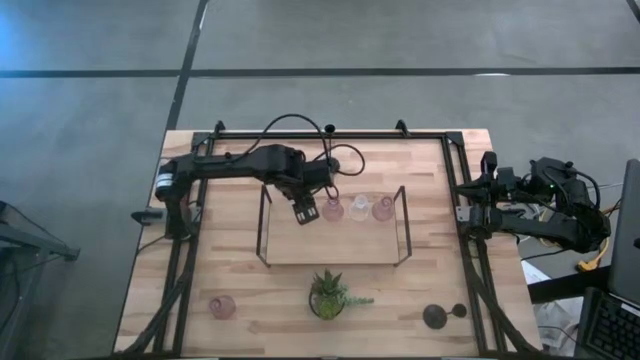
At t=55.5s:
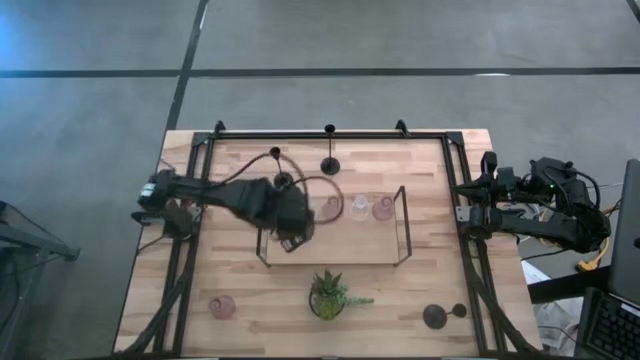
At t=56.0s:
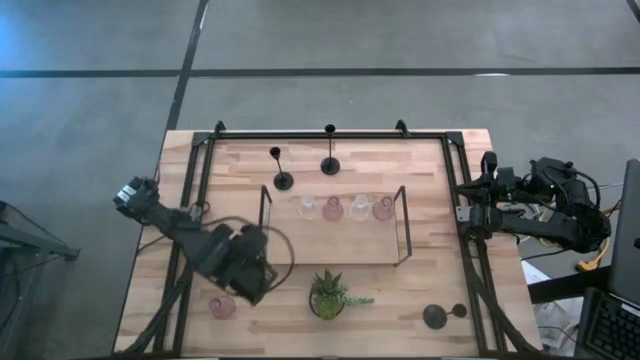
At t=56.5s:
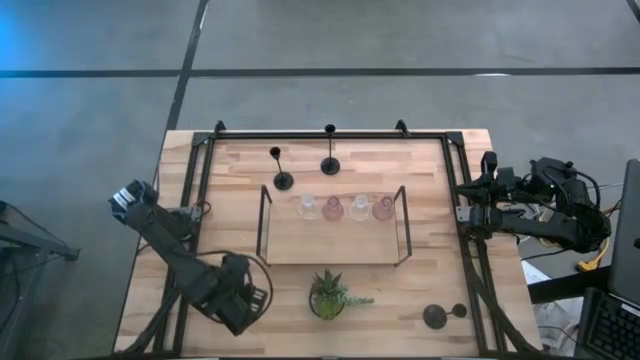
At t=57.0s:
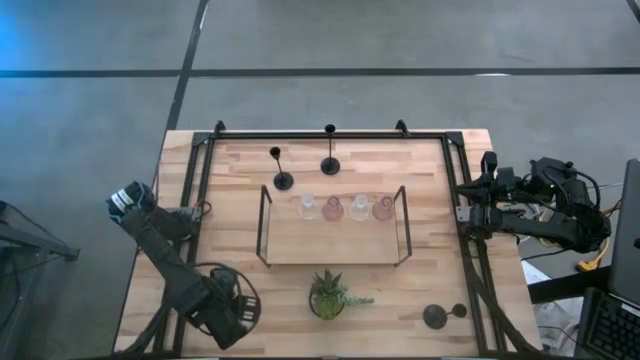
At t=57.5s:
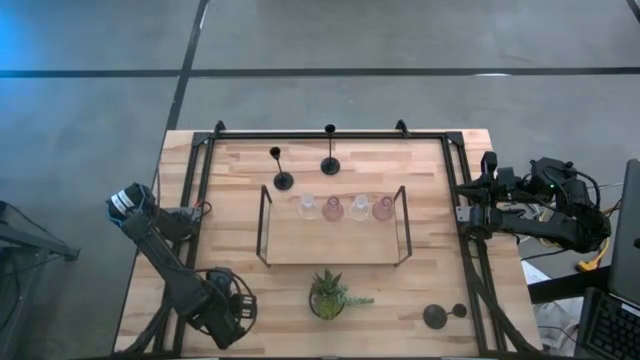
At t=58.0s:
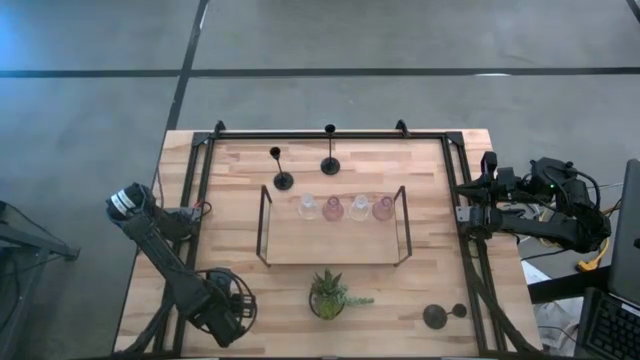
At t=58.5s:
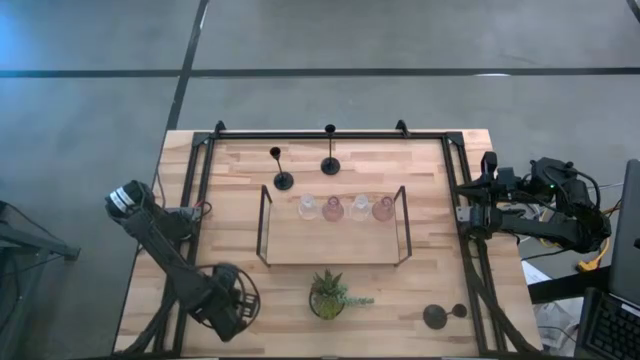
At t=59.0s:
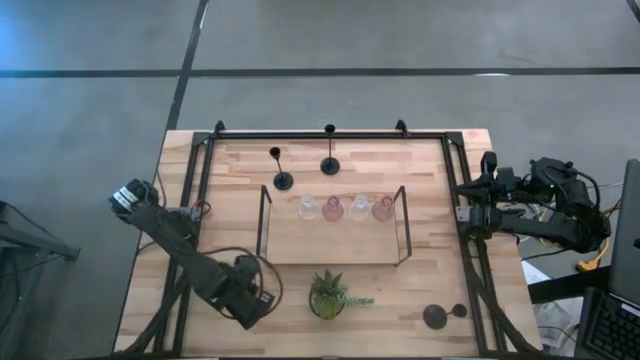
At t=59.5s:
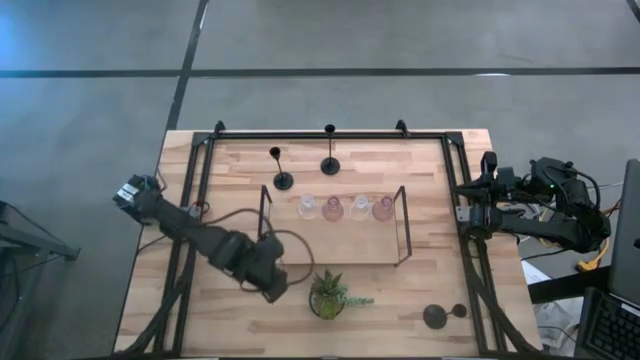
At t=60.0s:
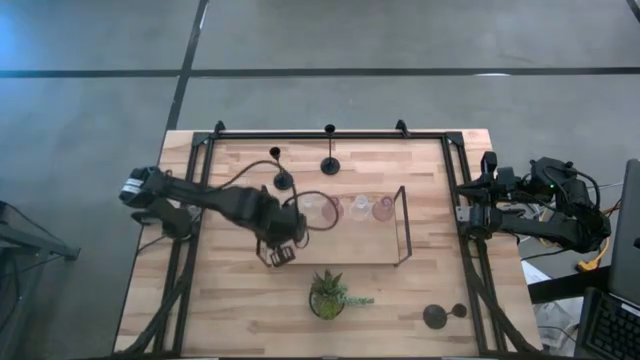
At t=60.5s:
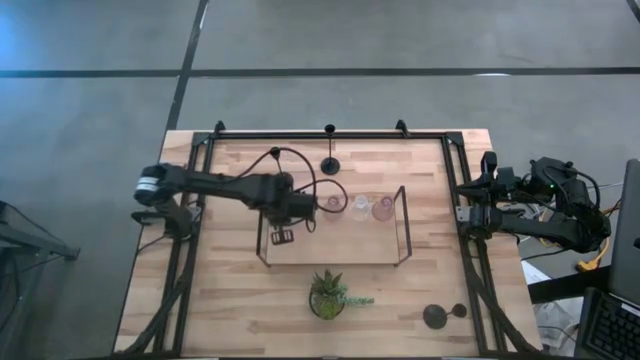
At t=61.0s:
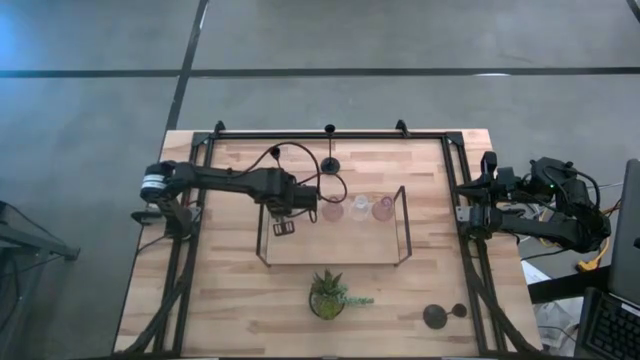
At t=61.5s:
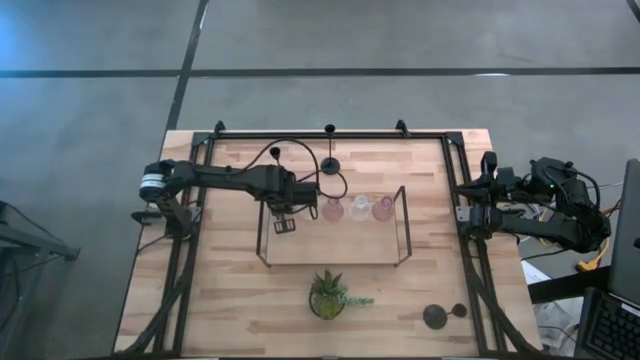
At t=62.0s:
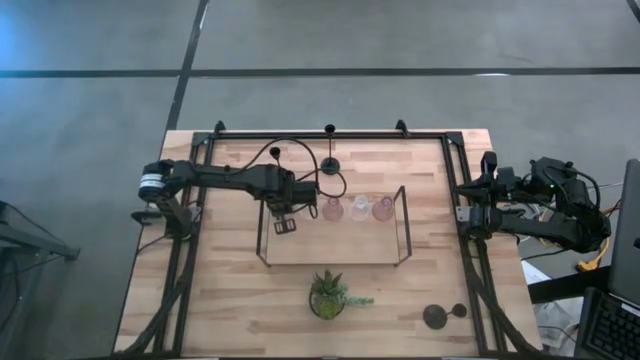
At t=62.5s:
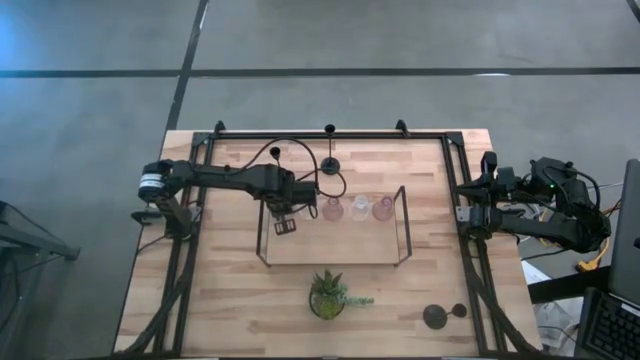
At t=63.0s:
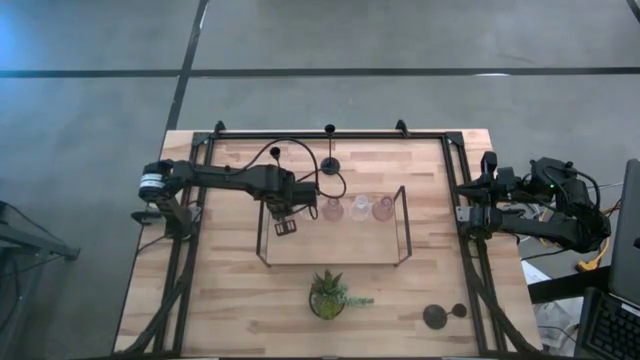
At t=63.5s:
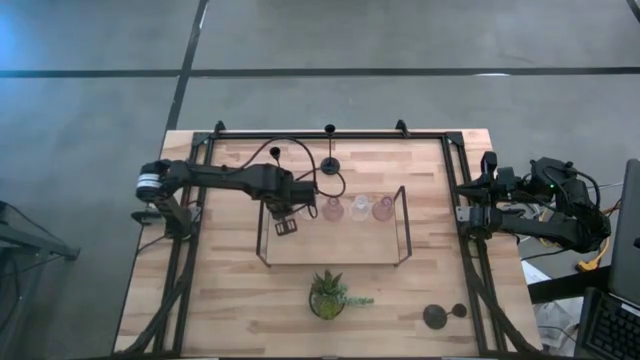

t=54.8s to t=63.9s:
Task: Pick & Place candle stick holders
Put the pink candle holder on the shelf

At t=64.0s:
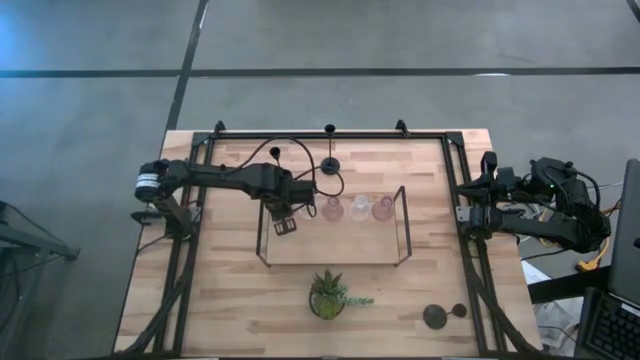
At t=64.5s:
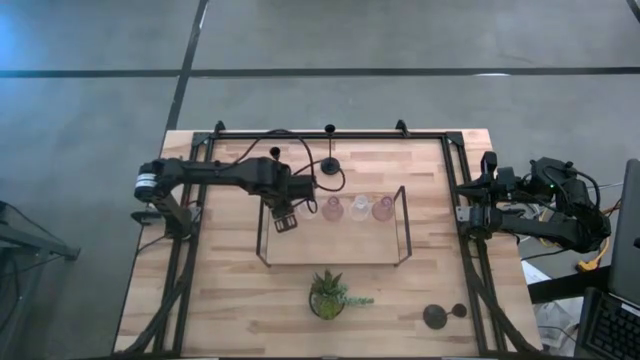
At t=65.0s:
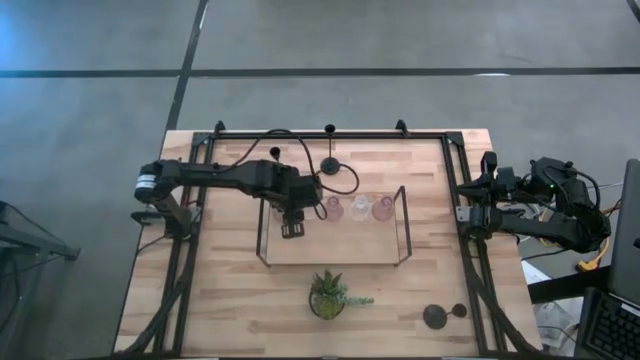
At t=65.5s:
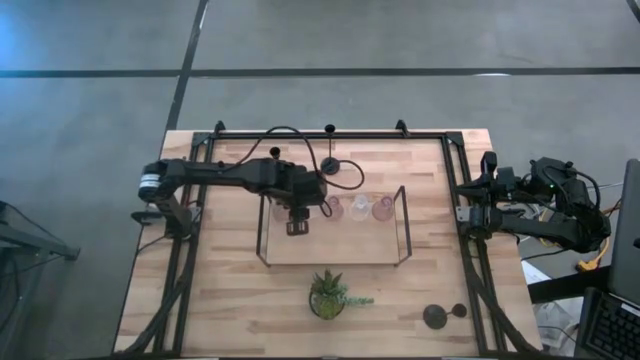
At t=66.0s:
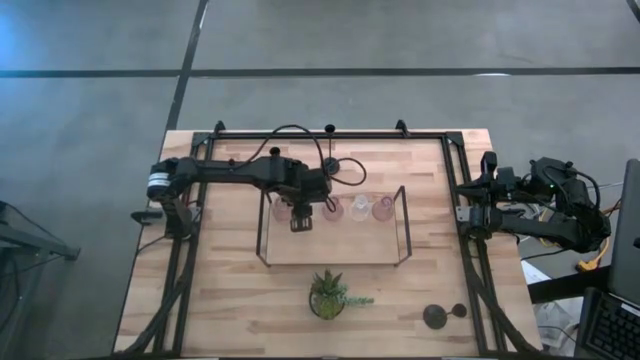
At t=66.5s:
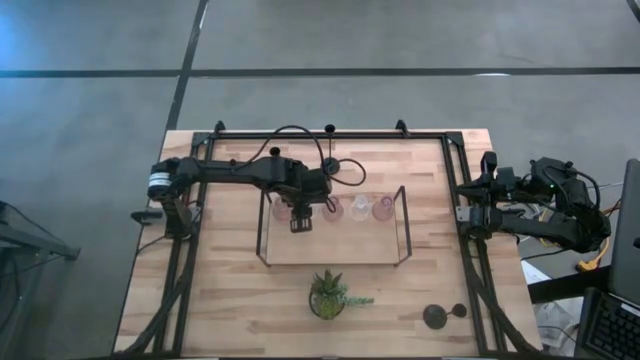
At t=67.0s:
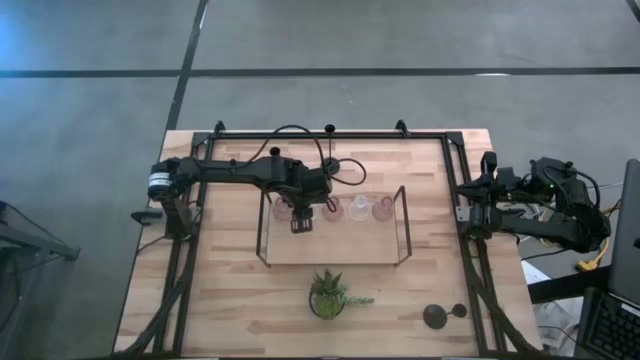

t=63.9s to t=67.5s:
Adjust the transparent candle holder on the shelf

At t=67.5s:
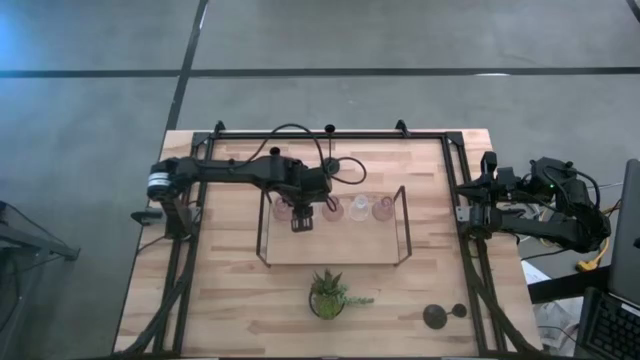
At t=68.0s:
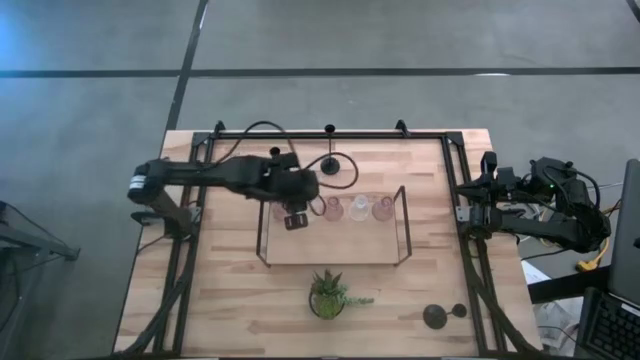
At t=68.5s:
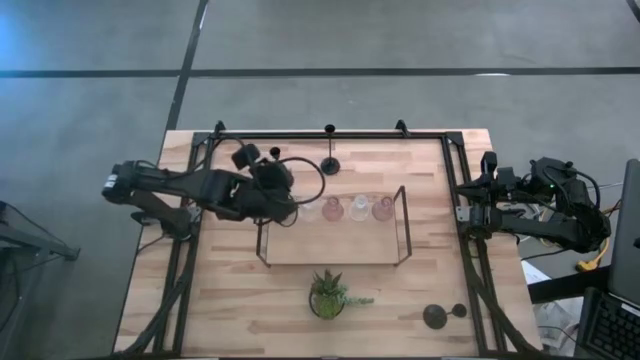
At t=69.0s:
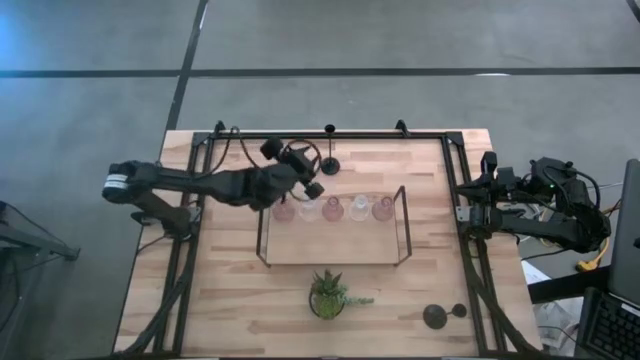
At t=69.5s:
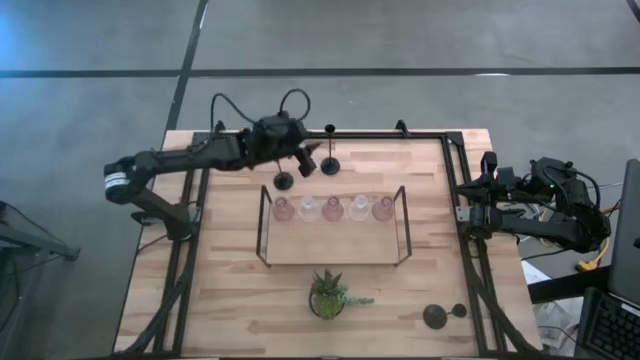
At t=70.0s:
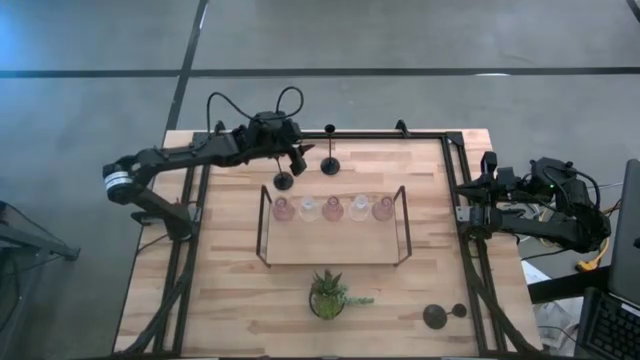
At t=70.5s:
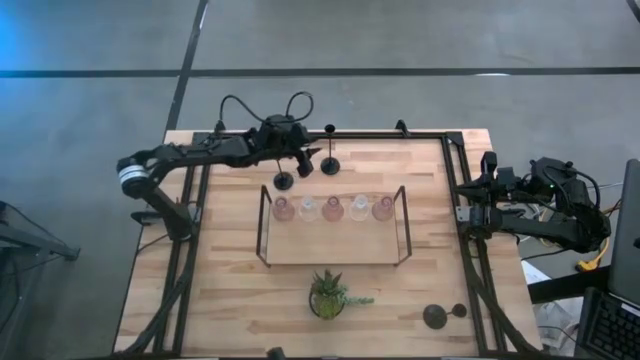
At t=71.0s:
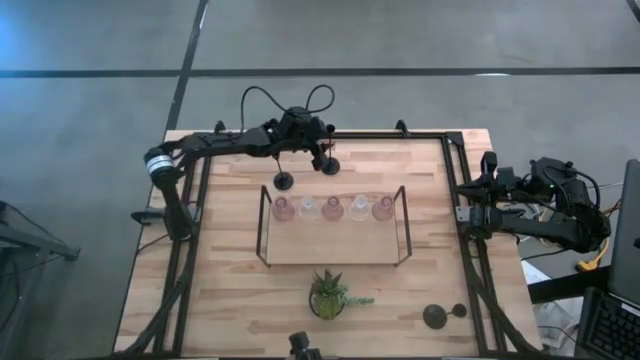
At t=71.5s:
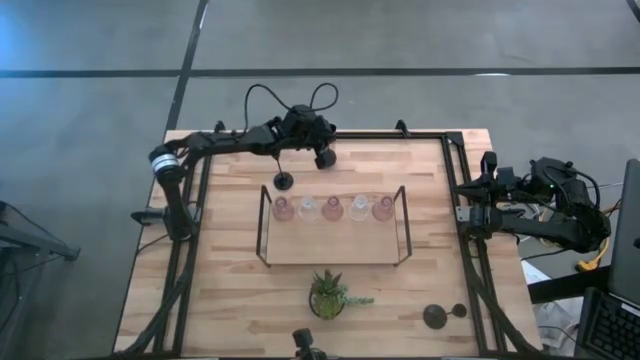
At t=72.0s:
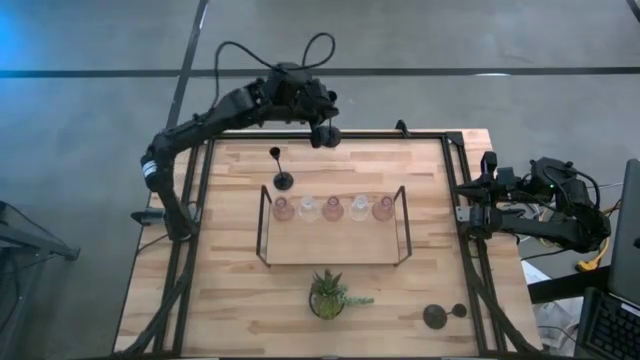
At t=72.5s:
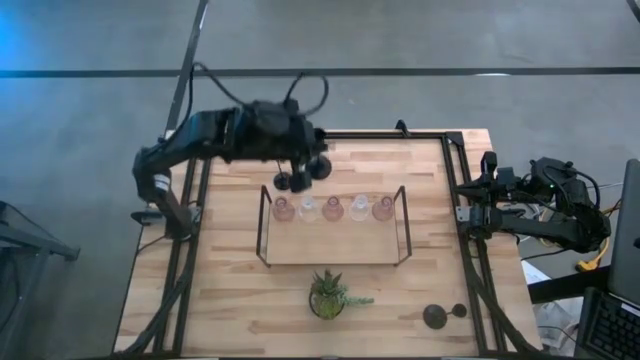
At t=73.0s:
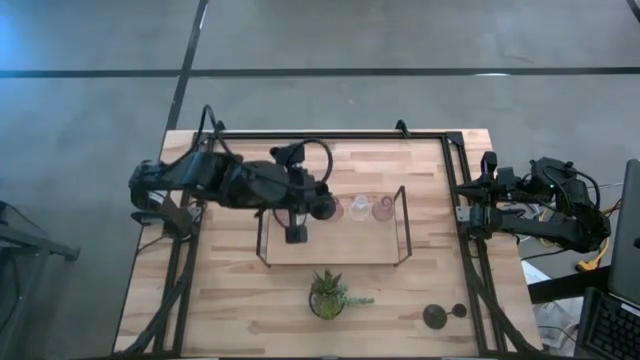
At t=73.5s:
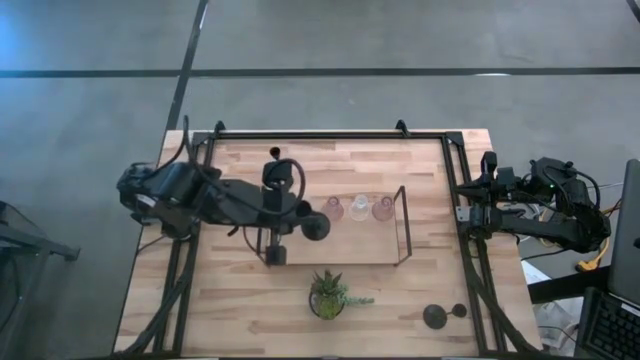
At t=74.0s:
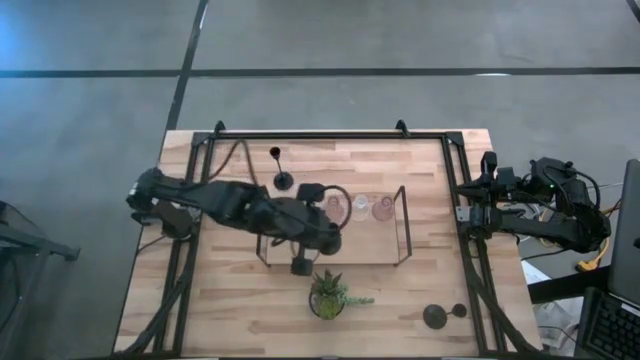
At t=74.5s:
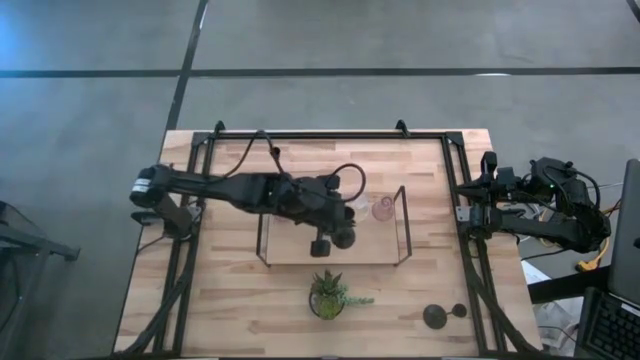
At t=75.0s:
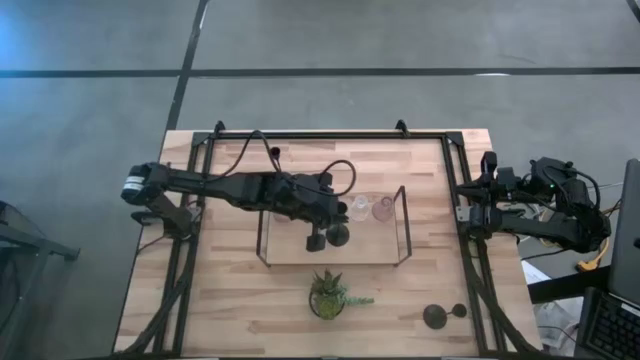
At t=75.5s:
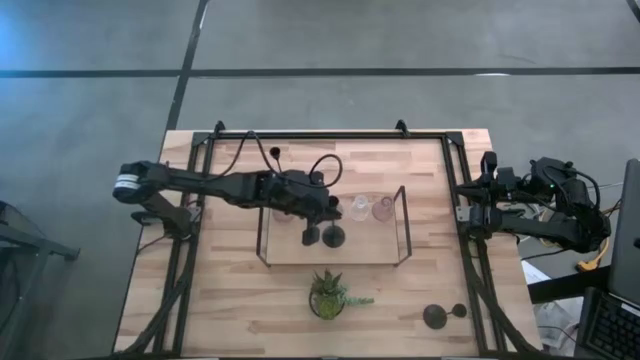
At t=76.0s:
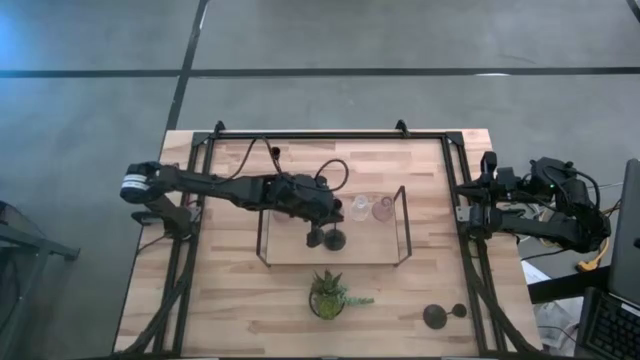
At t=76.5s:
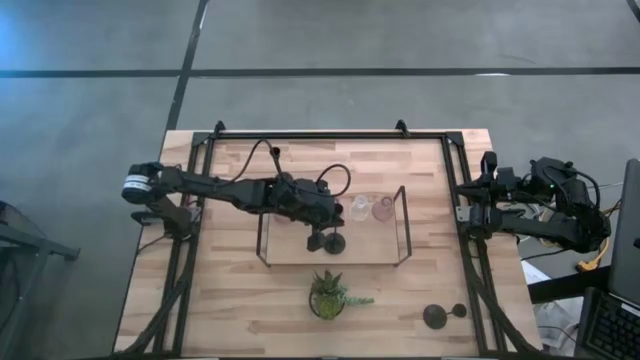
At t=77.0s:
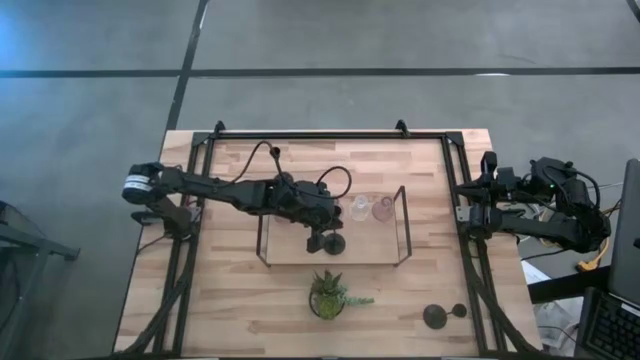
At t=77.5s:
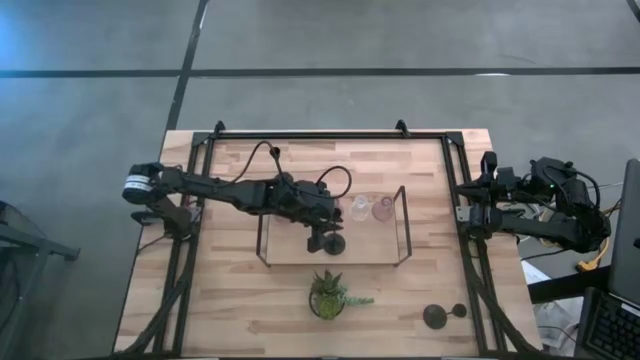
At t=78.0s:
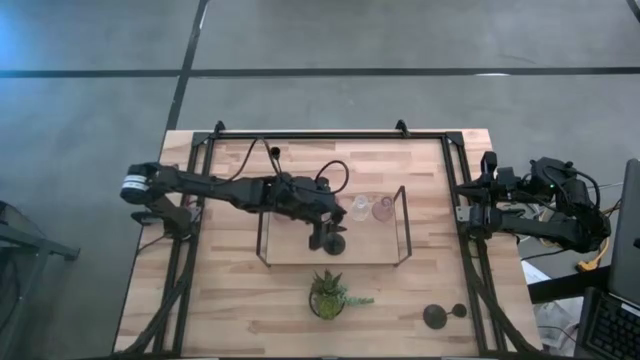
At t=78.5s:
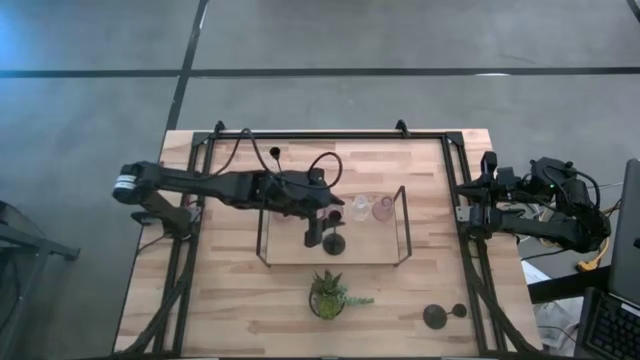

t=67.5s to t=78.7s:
Put the top right black candle holder on the shelf
